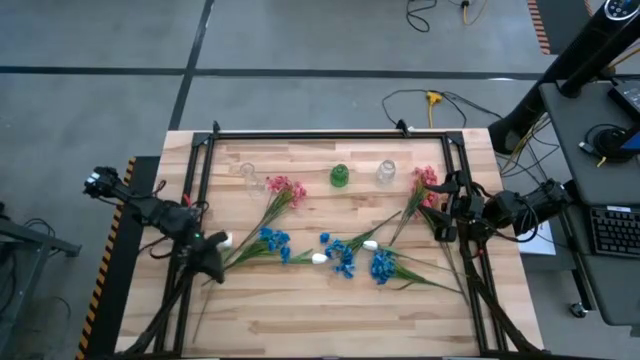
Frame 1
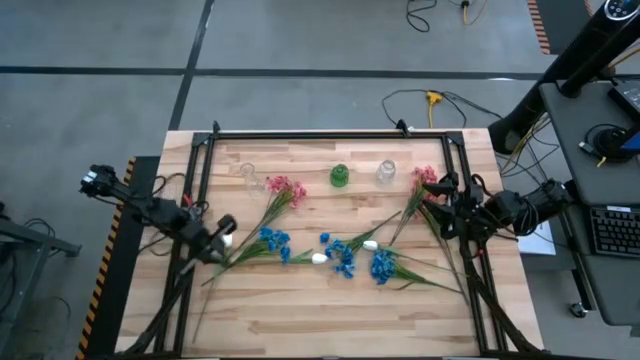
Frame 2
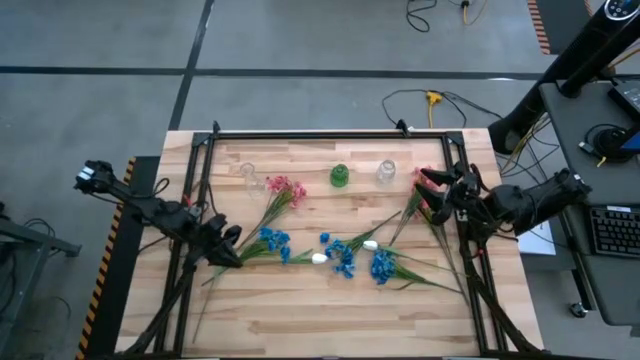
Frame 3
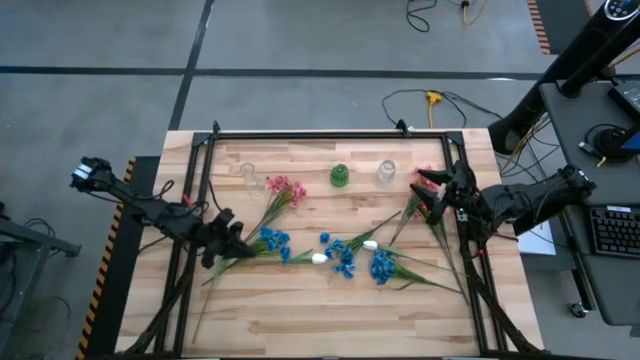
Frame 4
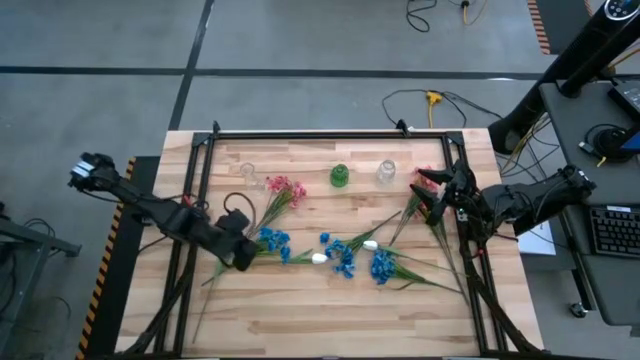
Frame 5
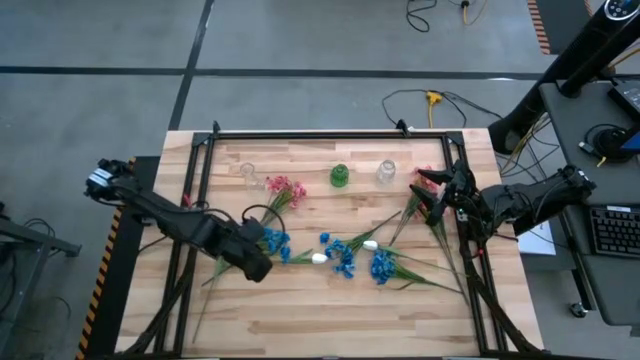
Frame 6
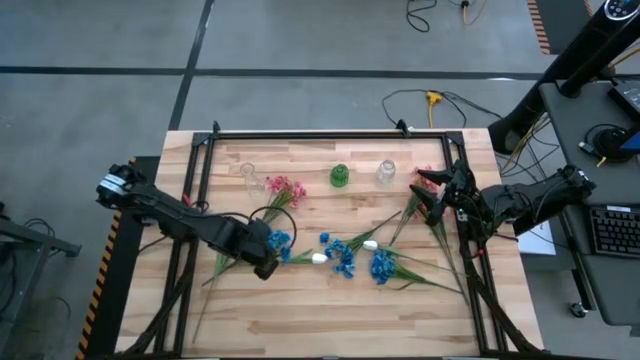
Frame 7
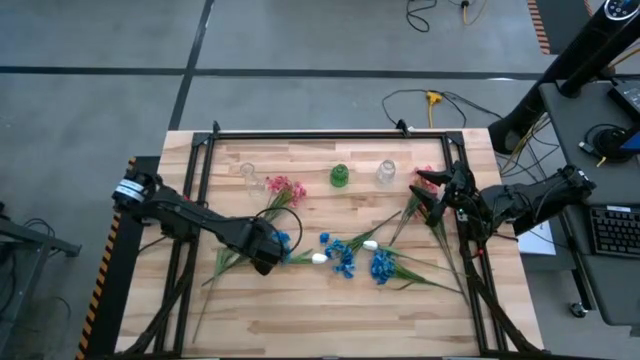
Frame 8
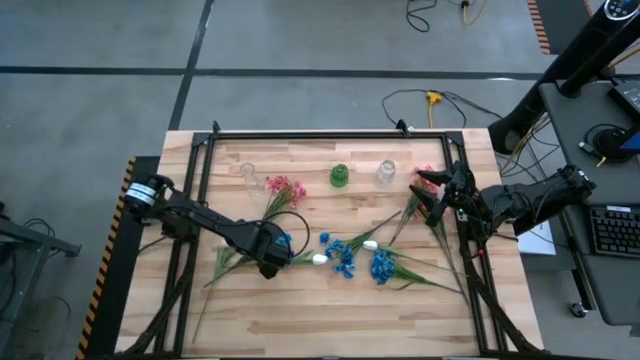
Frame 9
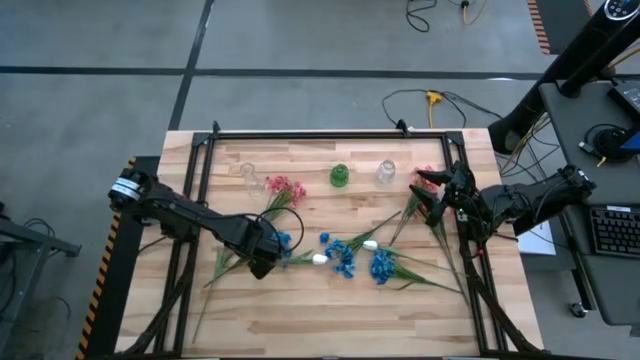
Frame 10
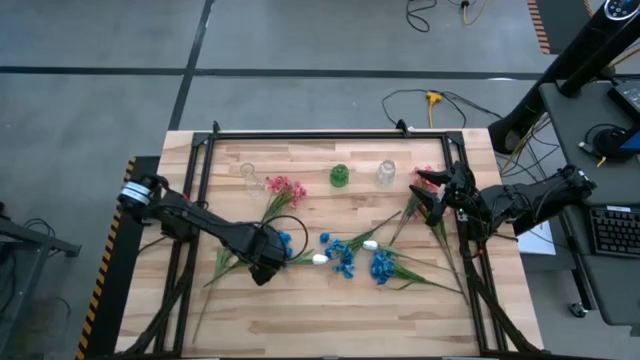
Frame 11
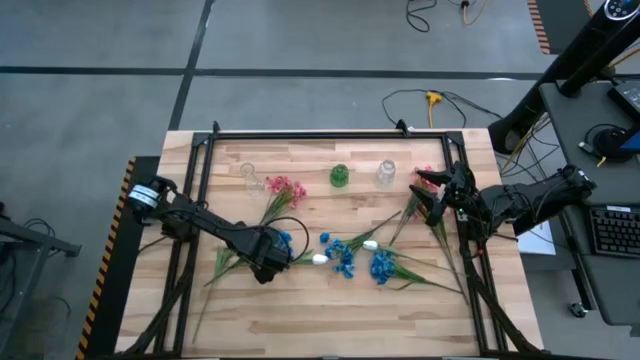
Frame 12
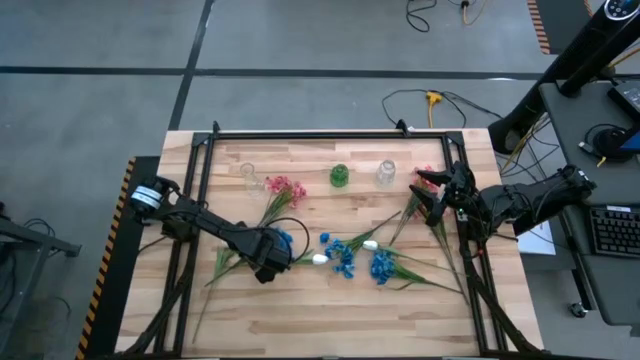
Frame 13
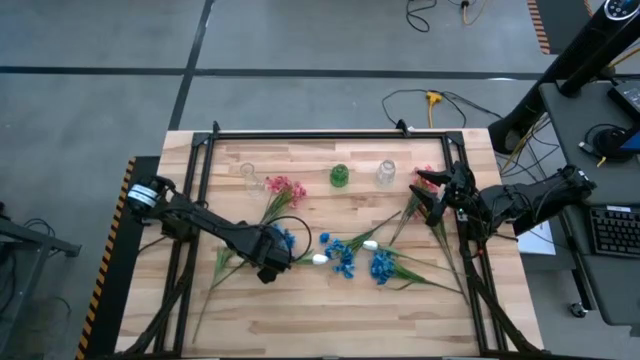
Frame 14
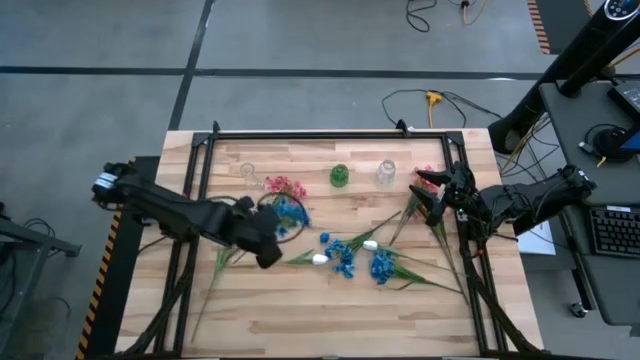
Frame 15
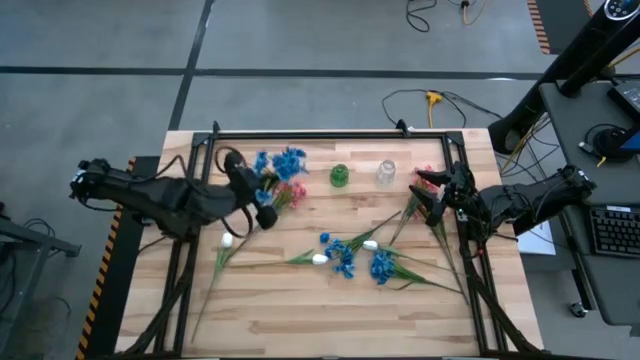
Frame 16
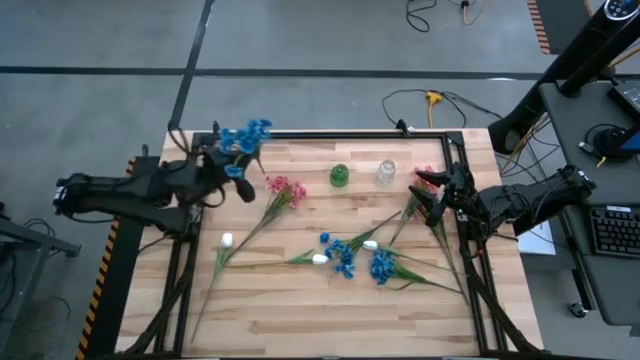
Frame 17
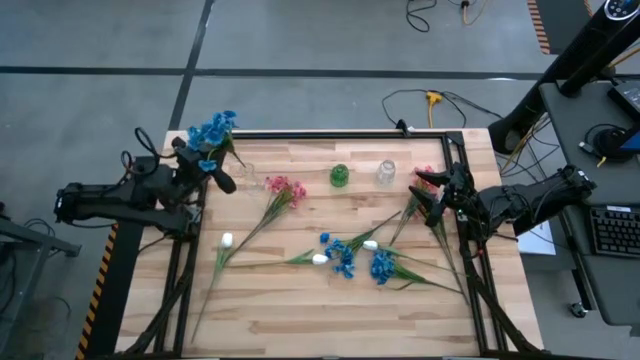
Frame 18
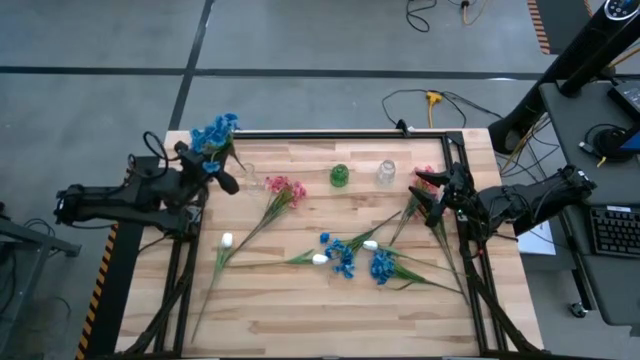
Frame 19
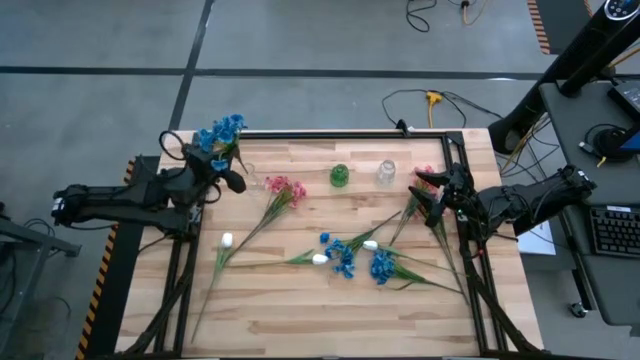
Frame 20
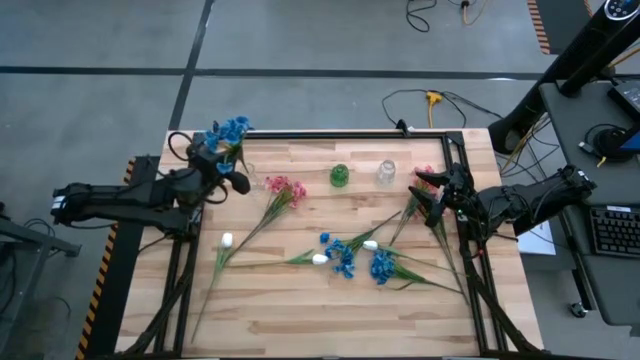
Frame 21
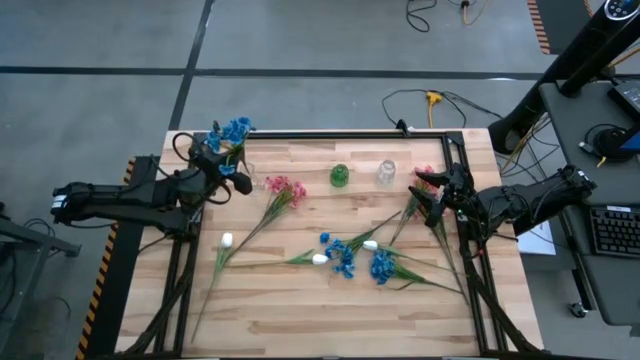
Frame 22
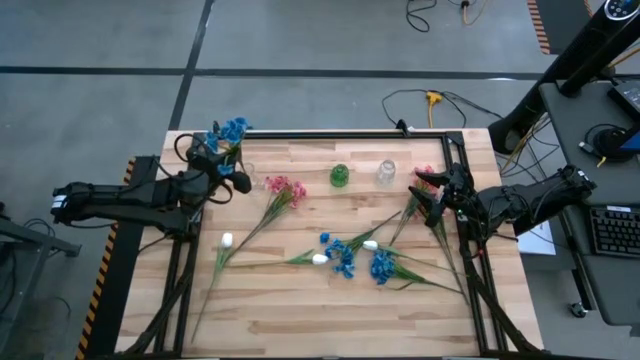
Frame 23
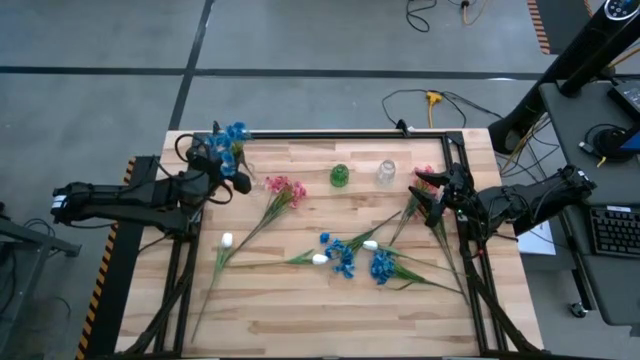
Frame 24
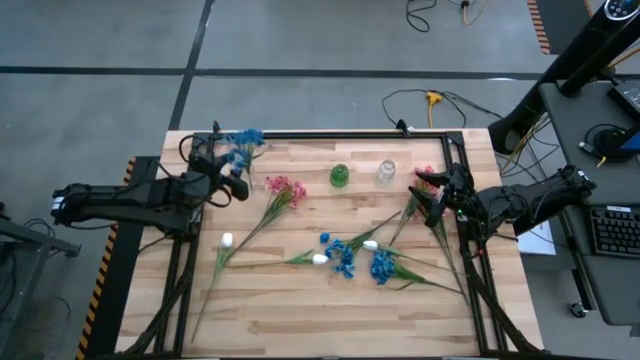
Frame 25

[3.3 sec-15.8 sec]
Task: Sort flowers into vase by color
Put the middle left blue flowers into the left transparent vase

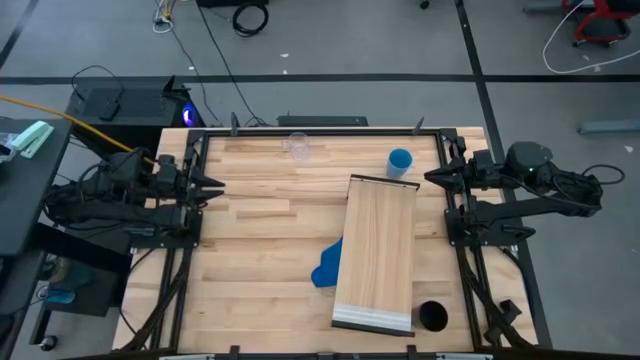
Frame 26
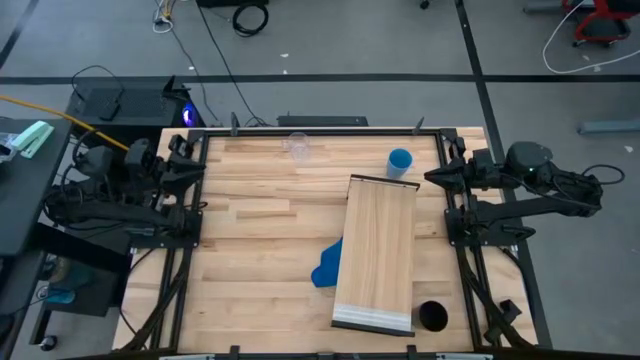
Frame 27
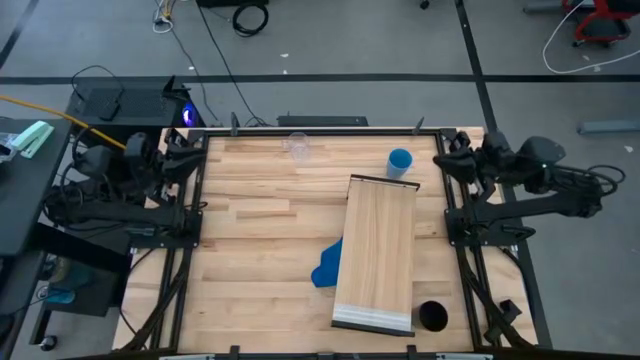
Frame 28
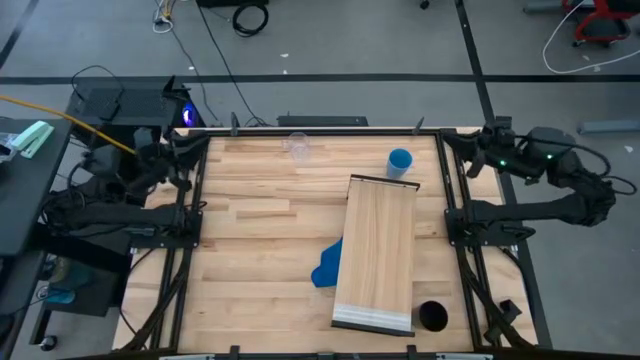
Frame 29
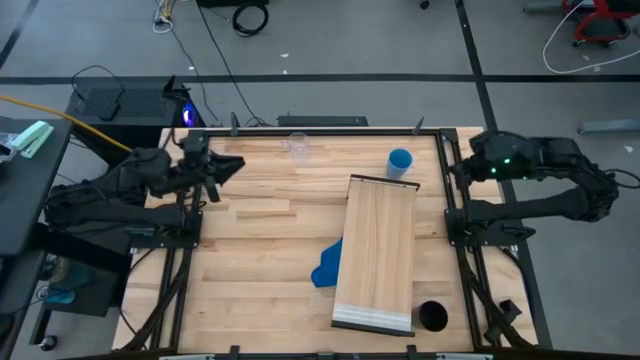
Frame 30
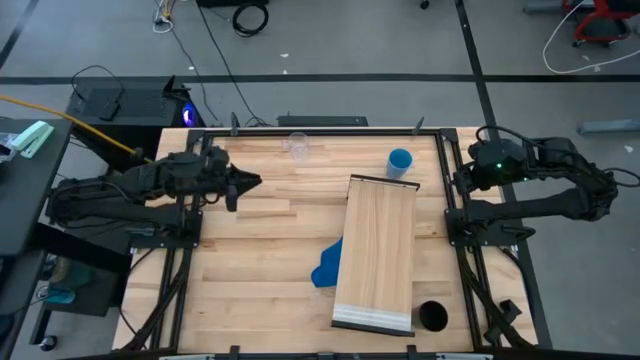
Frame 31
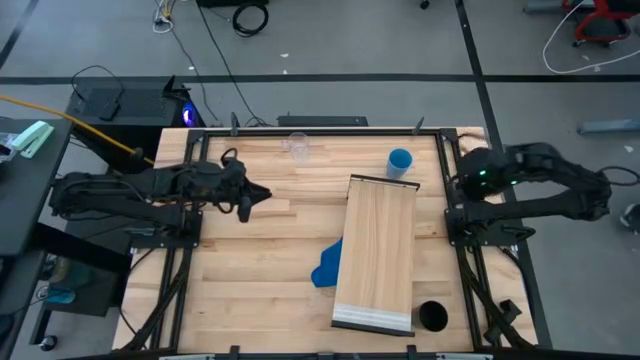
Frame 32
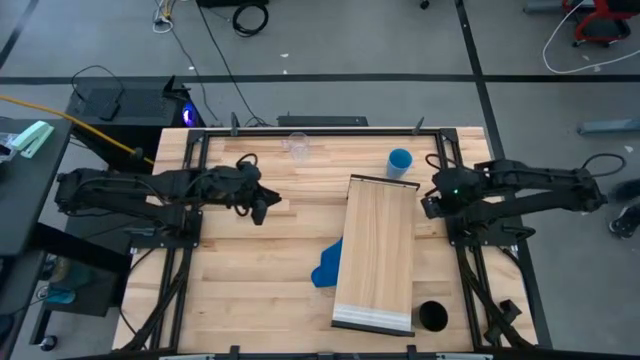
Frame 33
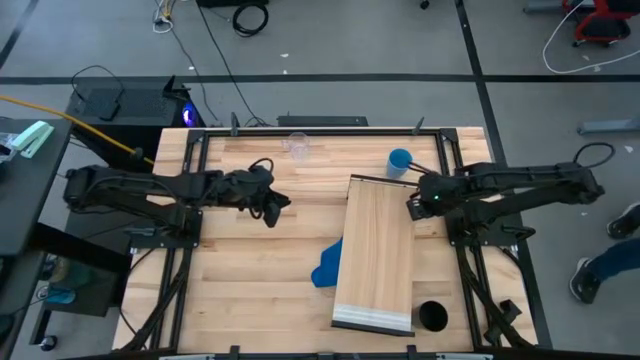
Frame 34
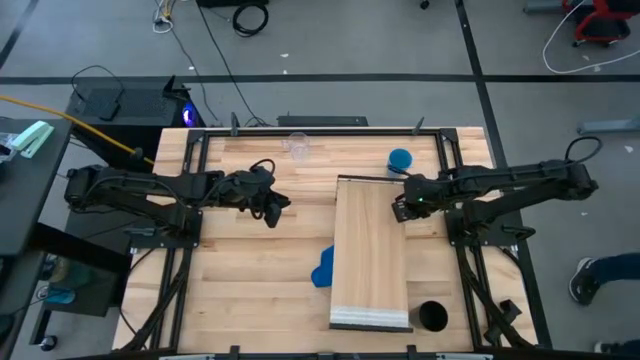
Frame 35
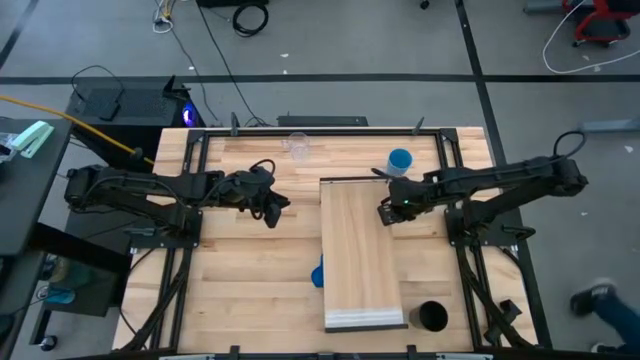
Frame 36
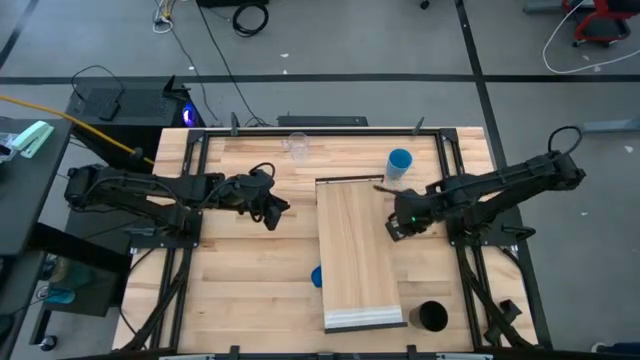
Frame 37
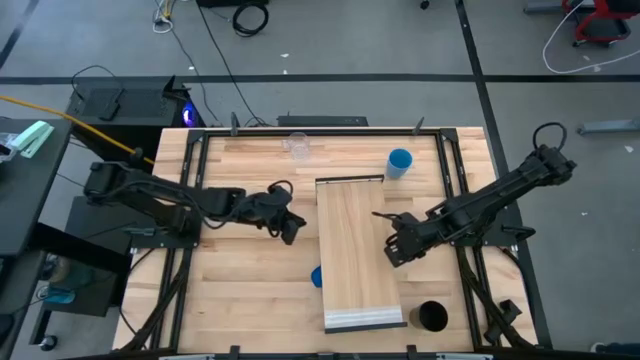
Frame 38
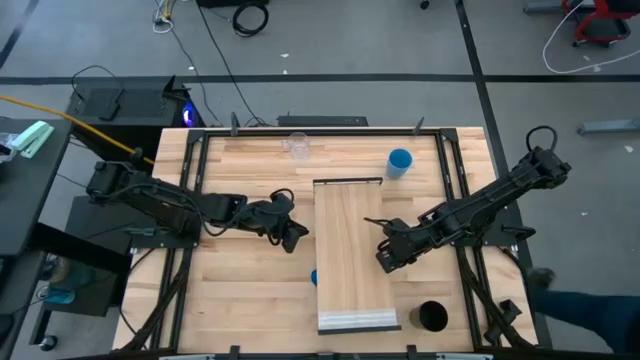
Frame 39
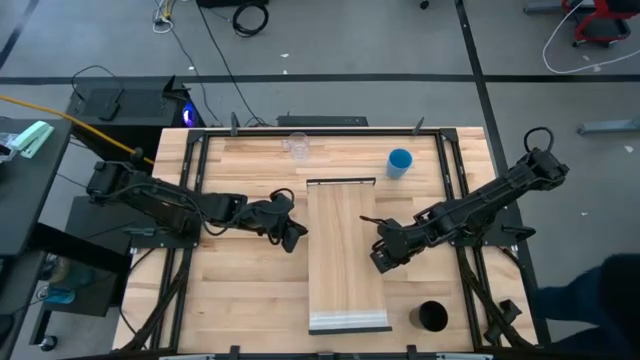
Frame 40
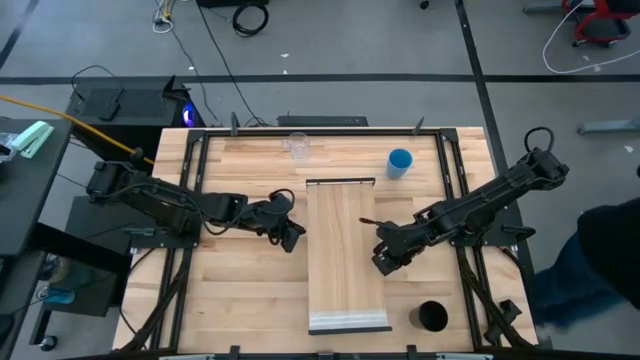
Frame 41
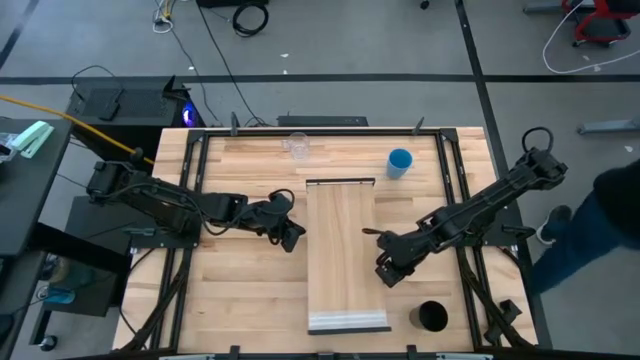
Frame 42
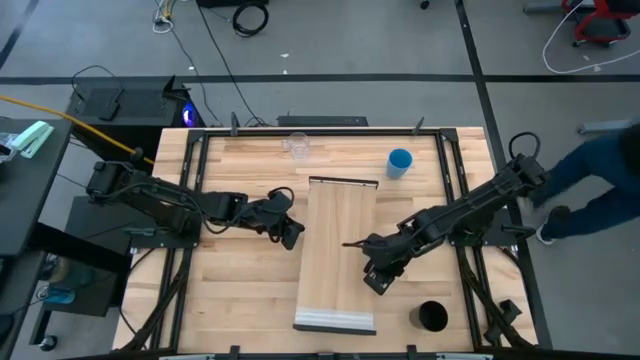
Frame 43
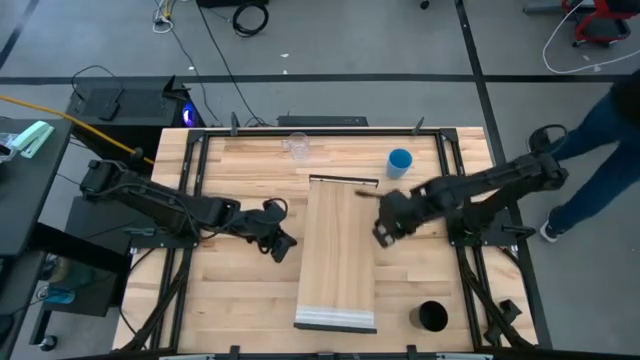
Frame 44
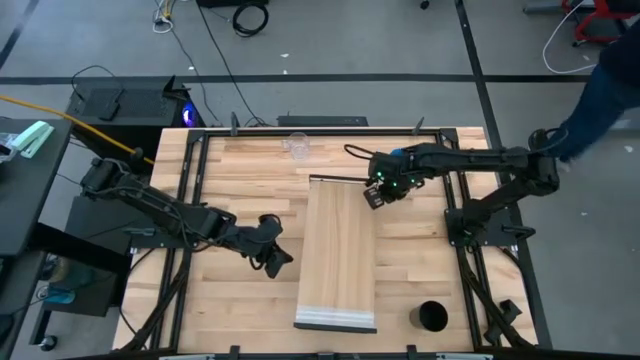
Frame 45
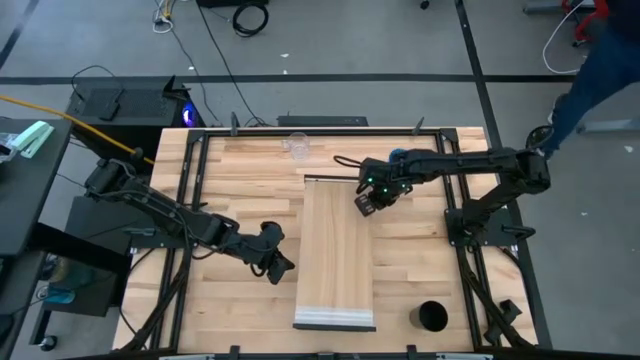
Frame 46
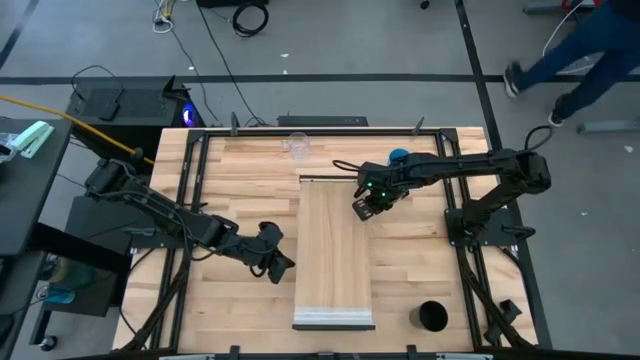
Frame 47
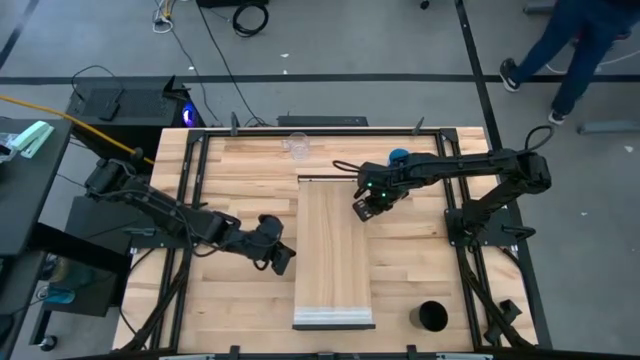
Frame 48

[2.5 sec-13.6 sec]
Task: Stack small to large cups/mugs on shelf
Move the shelf to the middle of the table
